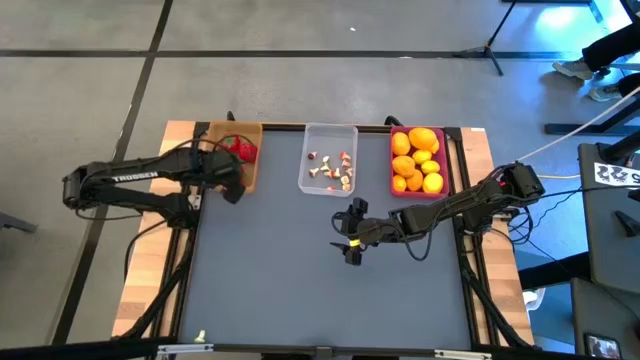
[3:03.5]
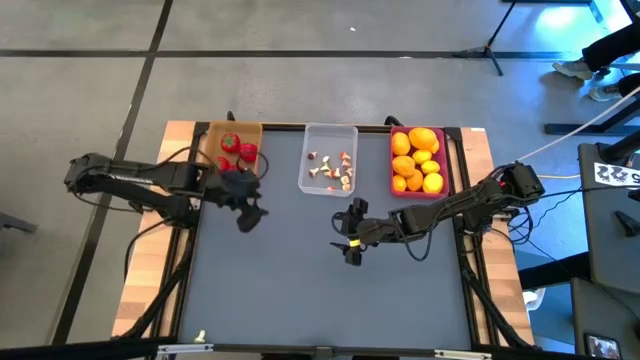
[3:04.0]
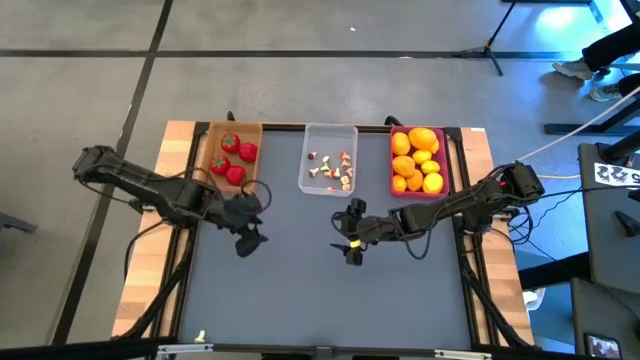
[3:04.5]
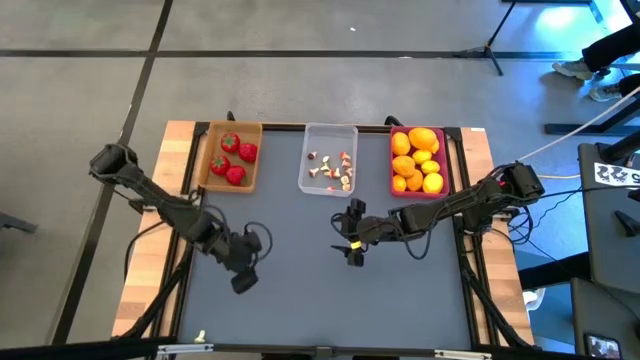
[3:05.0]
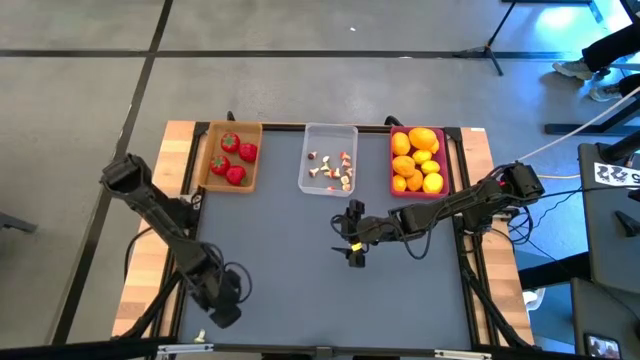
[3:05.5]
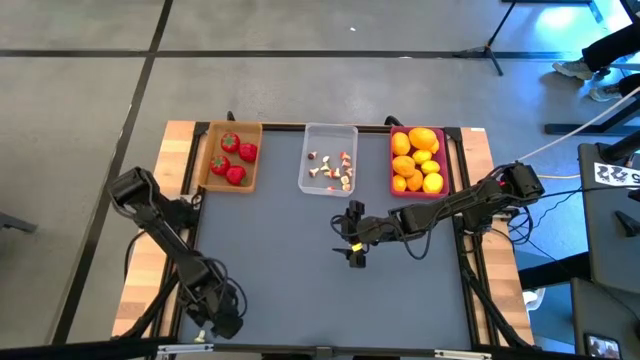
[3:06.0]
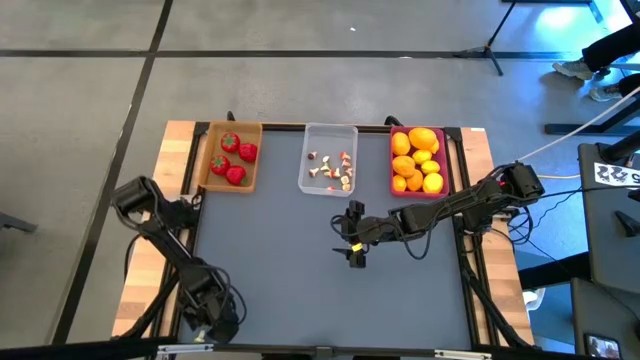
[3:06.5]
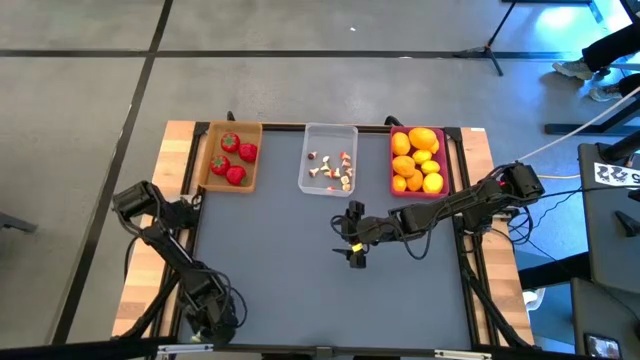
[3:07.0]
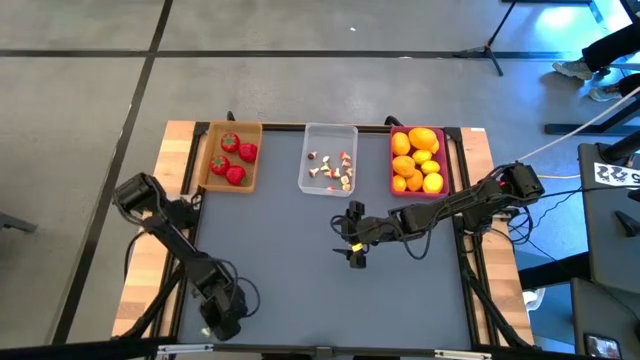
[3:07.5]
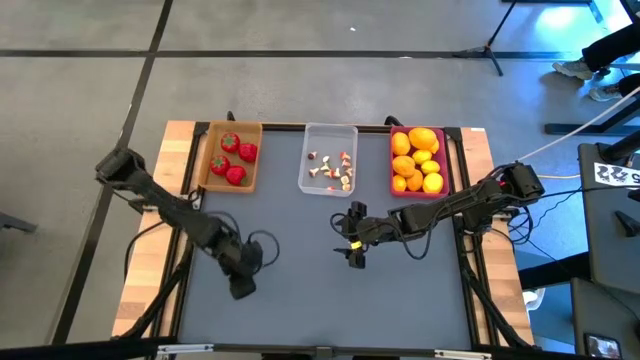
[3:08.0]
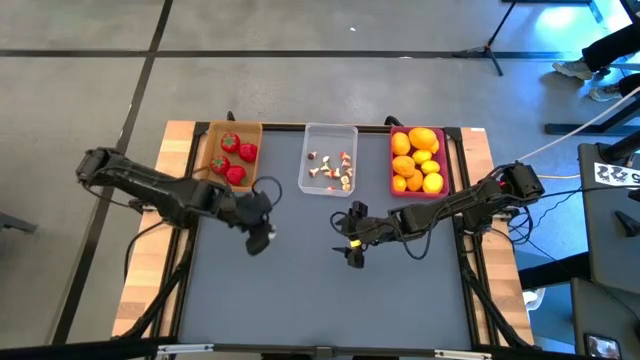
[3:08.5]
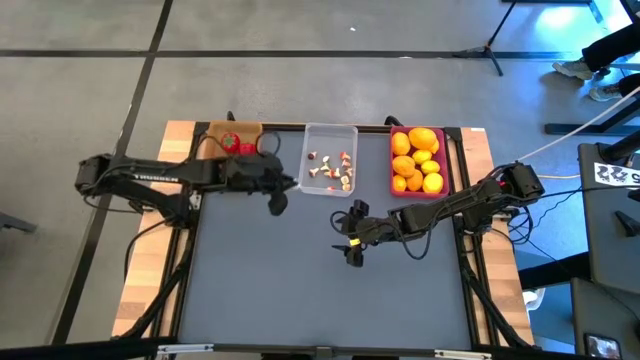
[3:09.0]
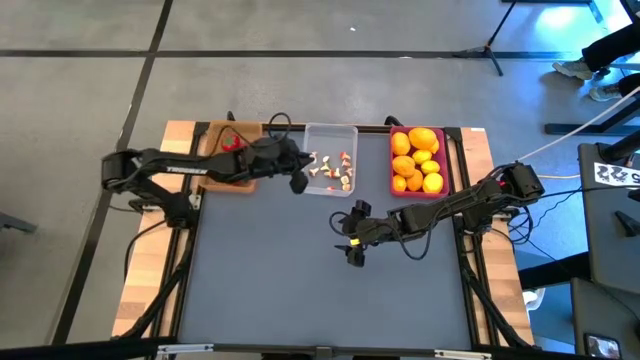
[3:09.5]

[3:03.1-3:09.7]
Task: Sort produce into baskets
Put the mushroom into the transparent bin

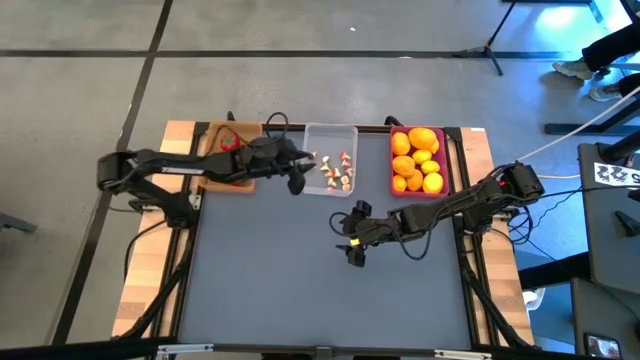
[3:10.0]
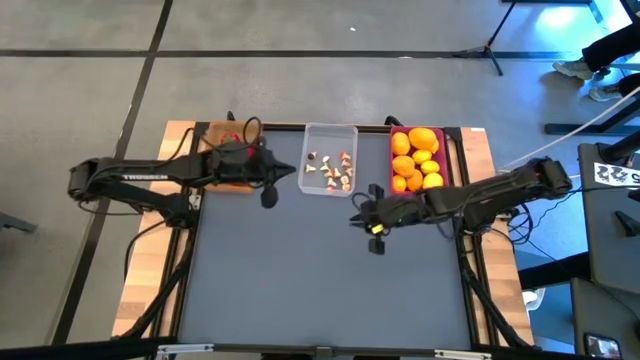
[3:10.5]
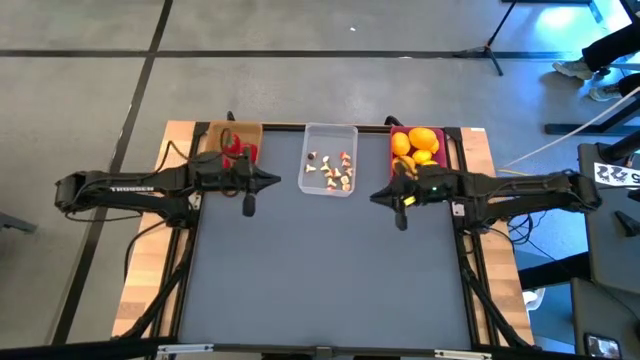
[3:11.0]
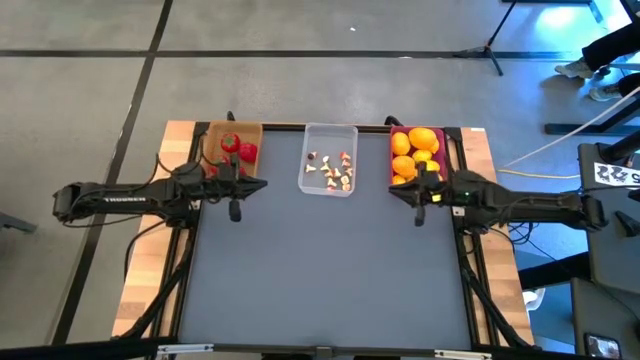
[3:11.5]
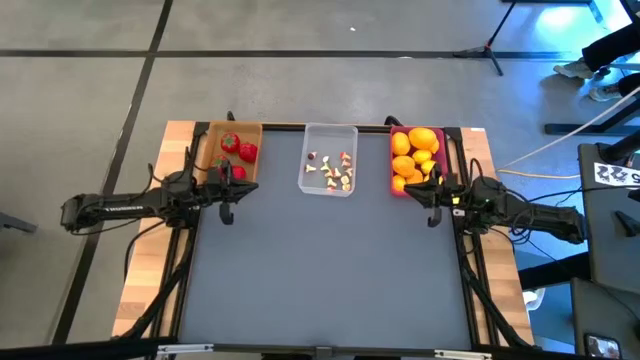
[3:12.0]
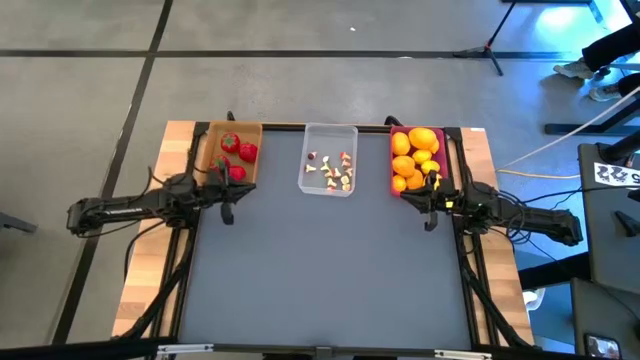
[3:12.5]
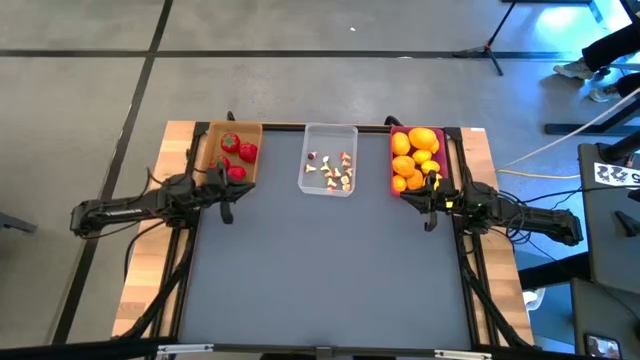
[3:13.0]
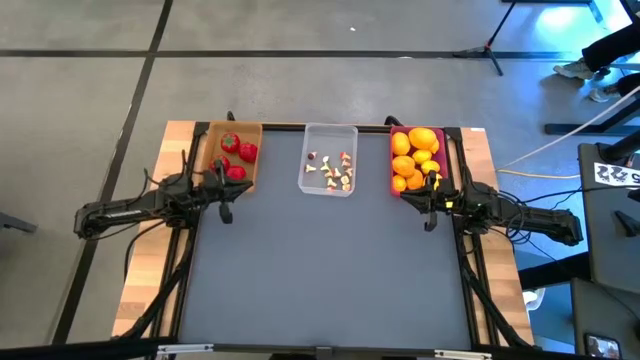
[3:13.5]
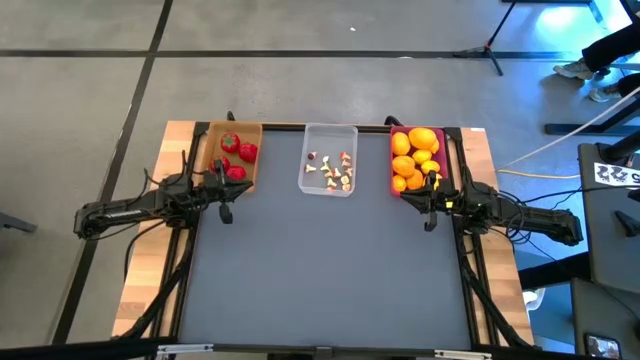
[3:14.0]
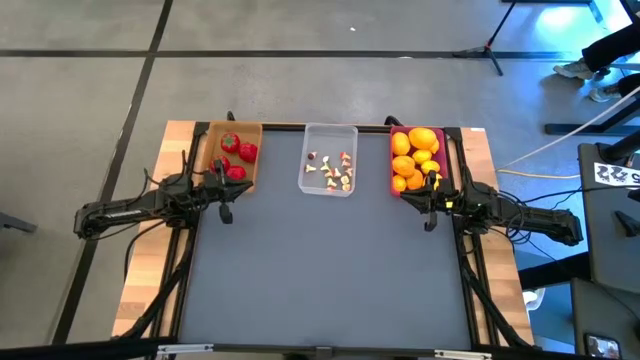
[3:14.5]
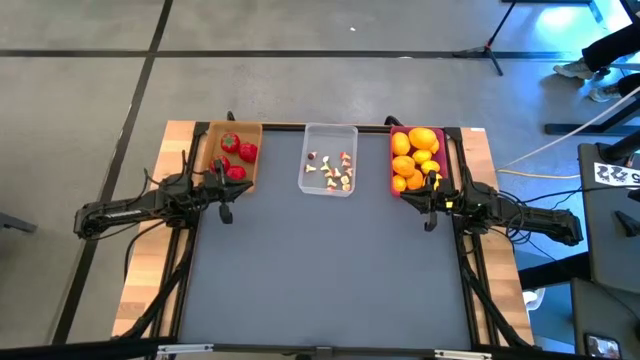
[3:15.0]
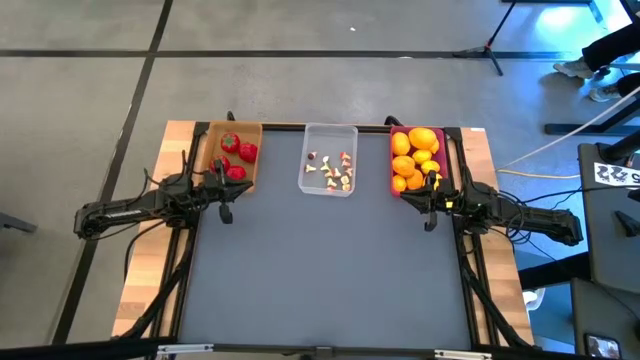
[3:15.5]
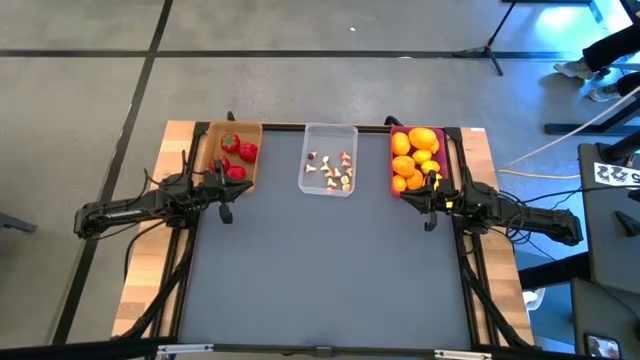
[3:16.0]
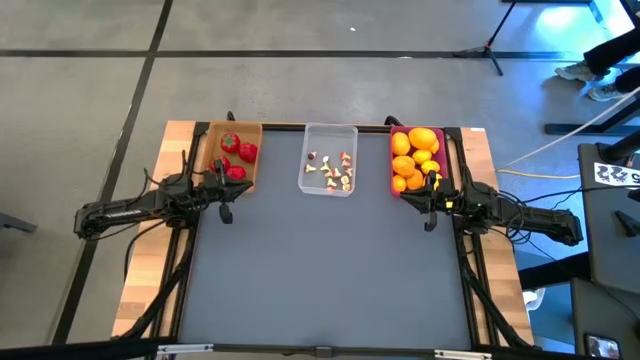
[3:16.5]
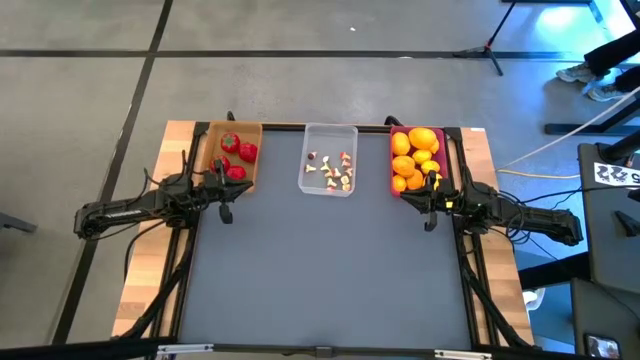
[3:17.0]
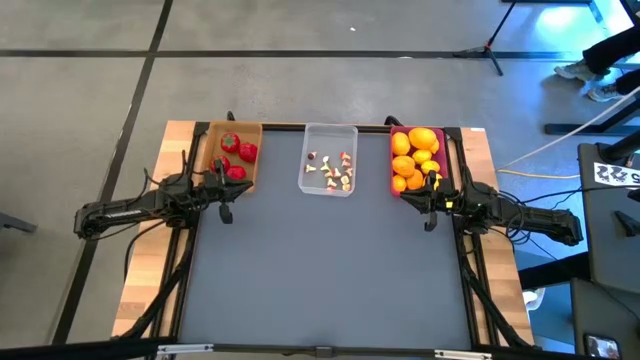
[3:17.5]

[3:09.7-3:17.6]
Return to home position

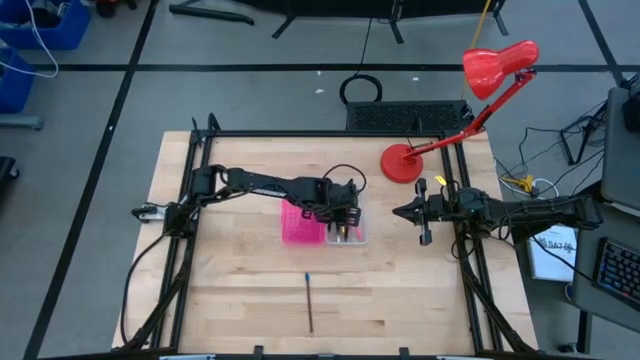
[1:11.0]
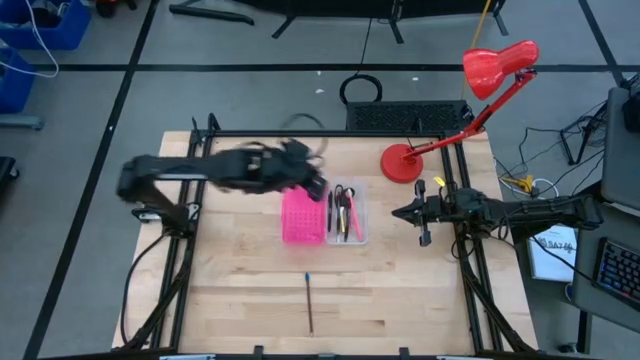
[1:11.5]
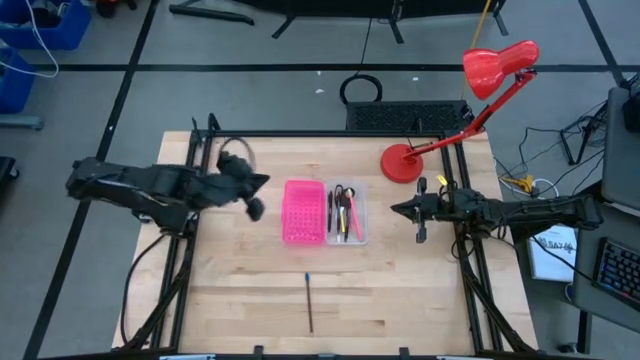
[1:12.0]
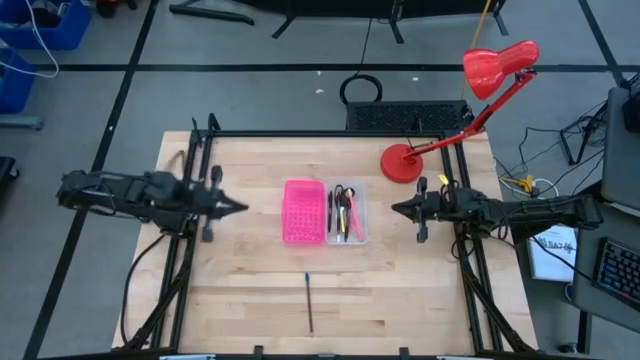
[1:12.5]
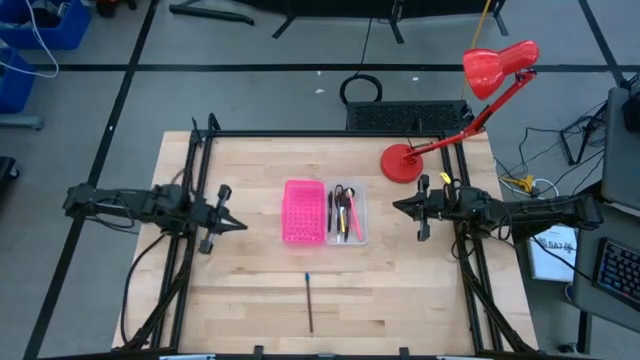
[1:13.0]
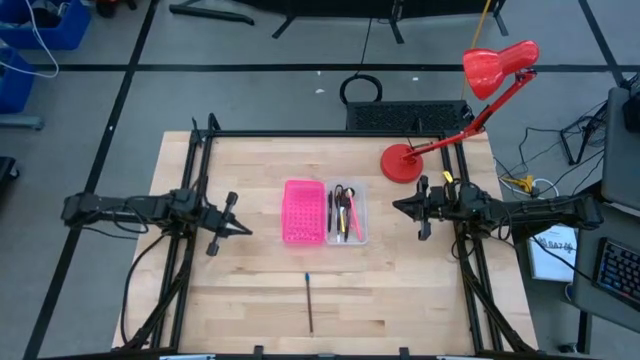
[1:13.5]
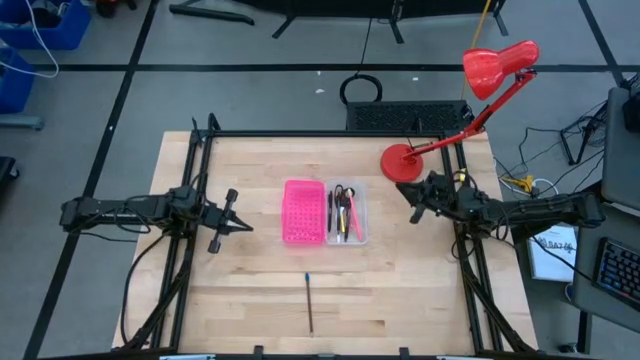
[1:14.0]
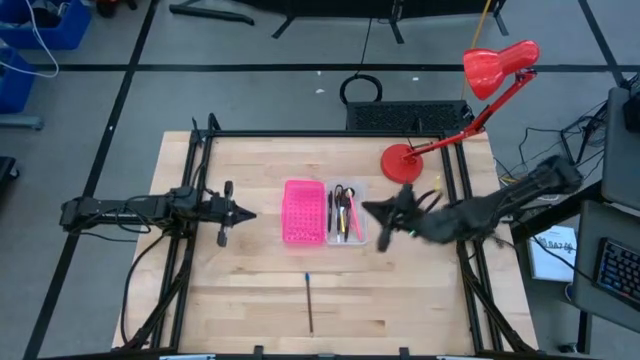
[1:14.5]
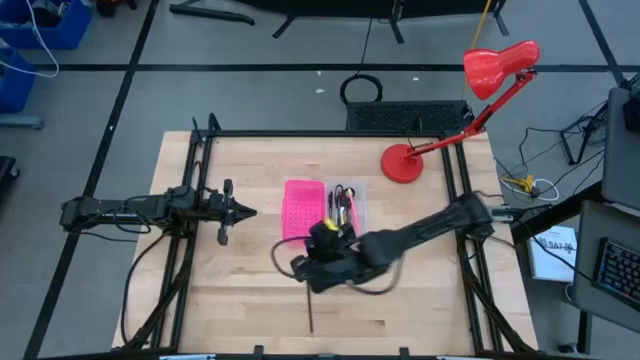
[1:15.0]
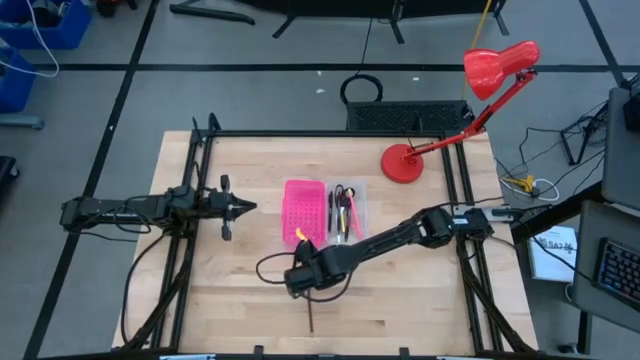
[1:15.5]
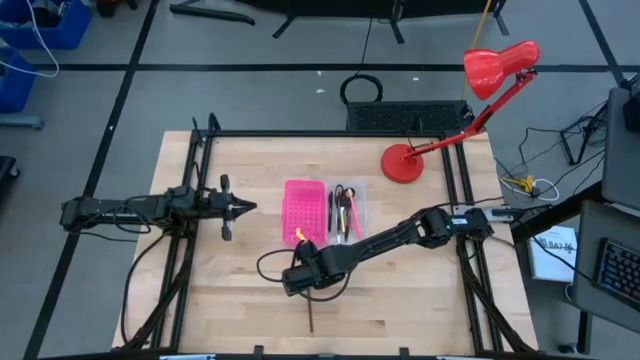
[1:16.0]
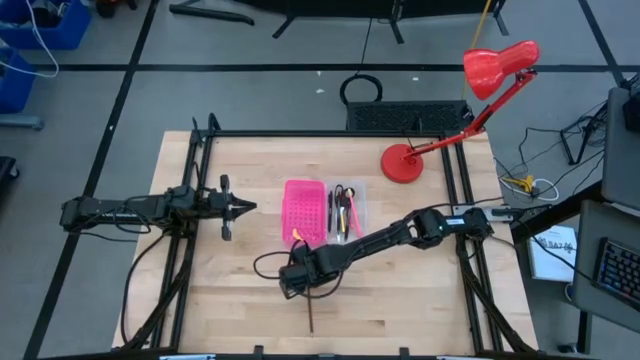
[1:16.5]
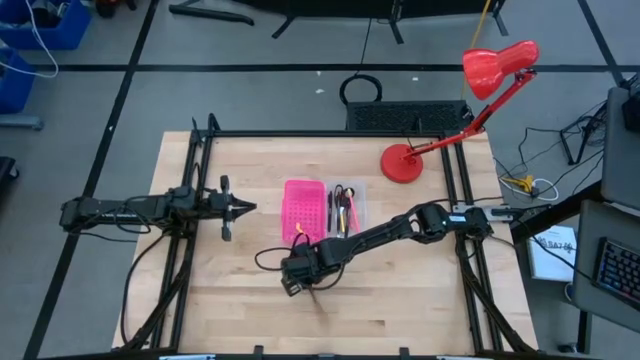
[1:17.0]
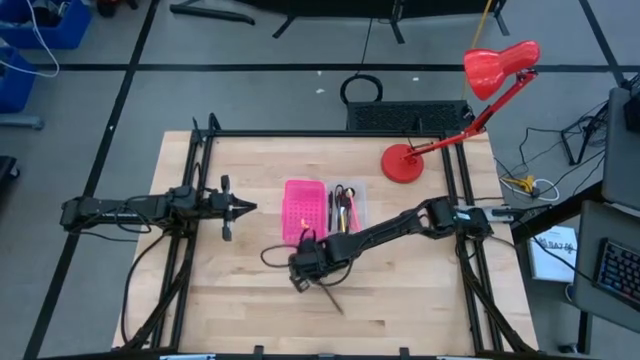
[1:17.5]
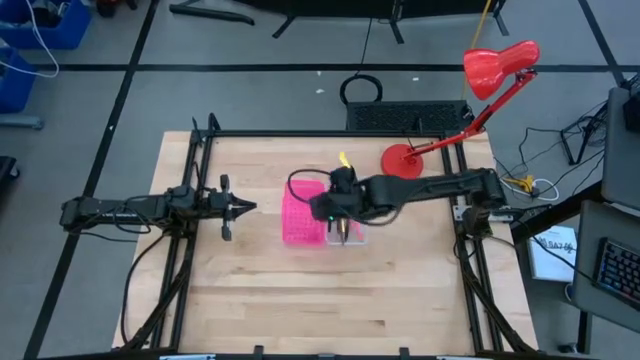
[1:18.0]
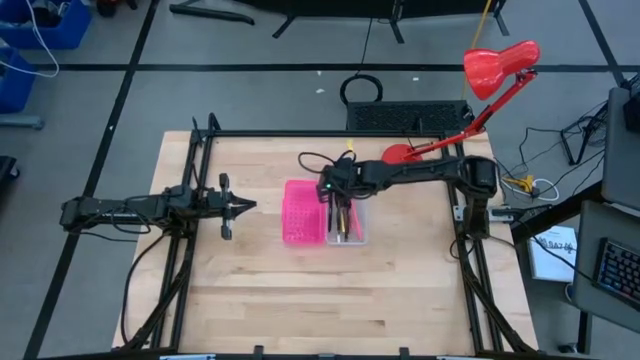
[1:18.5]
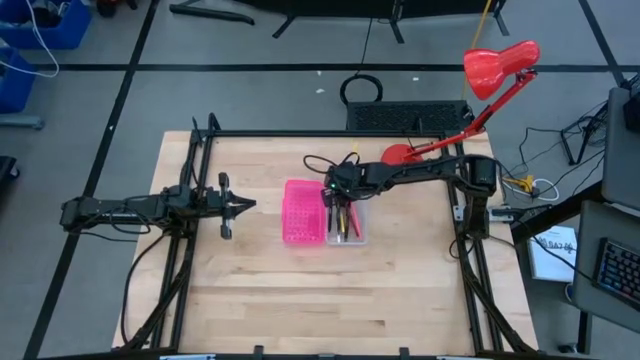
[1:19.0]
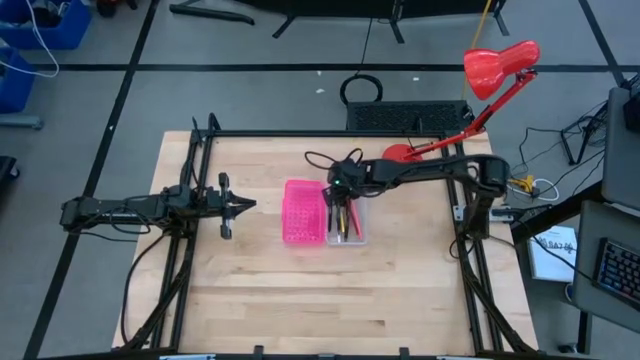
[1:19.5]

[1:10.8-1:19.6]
Task: Pick & place school supplies into a supply box
Put the brown pencil into the supply box
